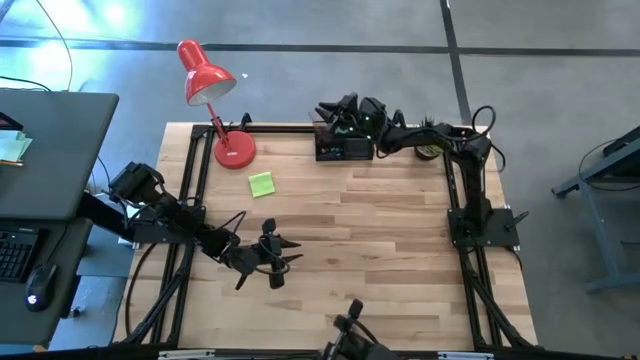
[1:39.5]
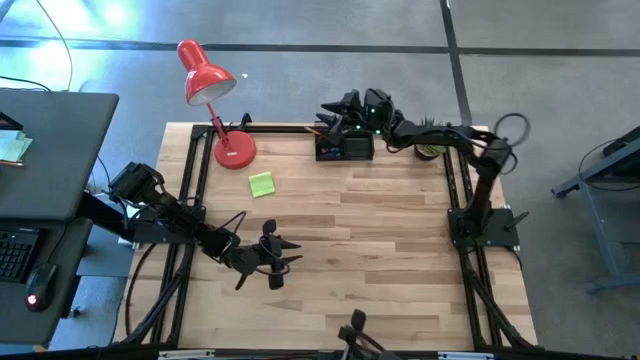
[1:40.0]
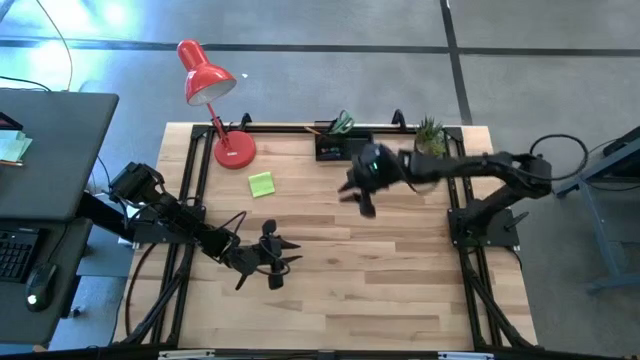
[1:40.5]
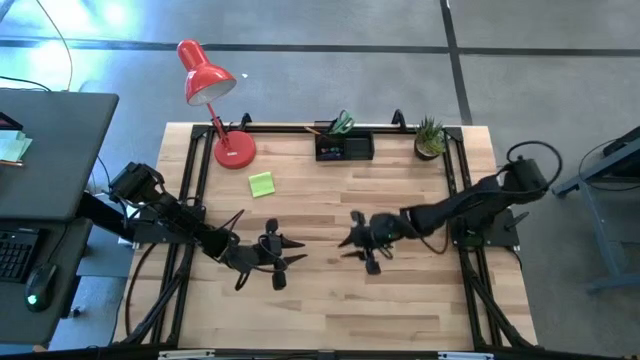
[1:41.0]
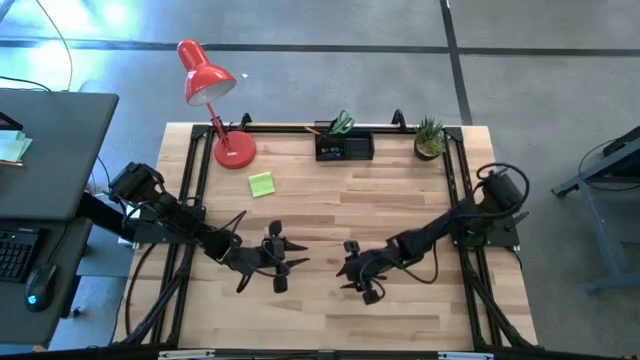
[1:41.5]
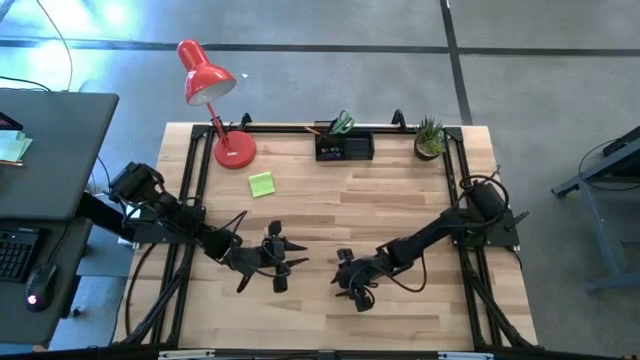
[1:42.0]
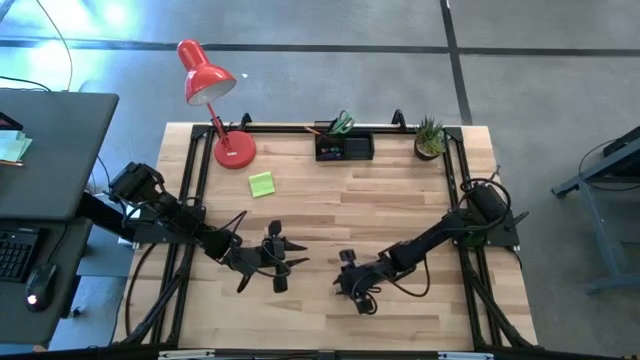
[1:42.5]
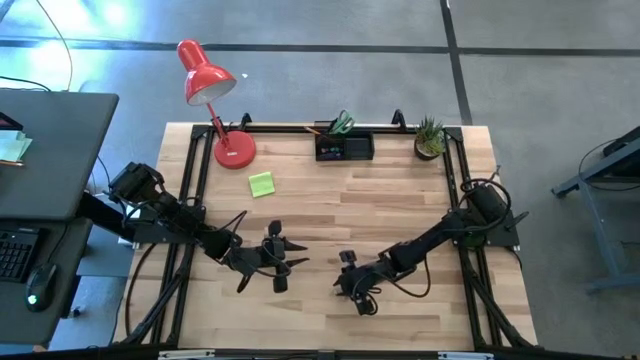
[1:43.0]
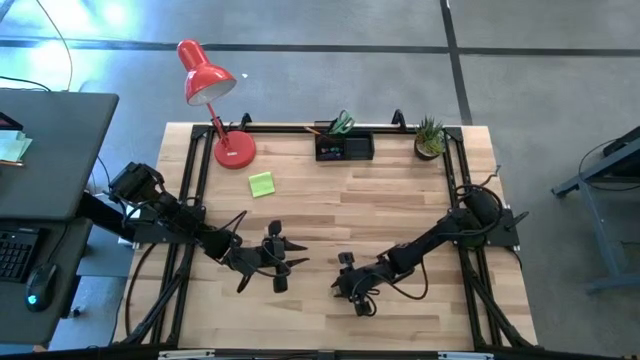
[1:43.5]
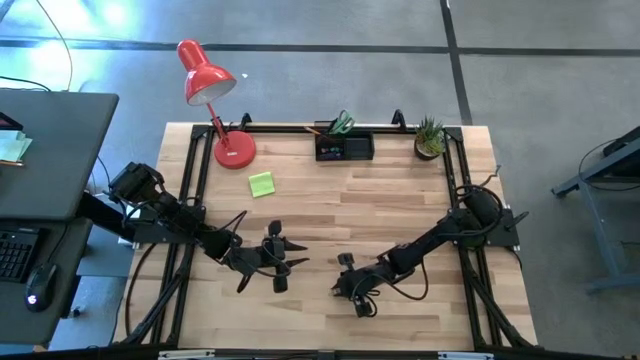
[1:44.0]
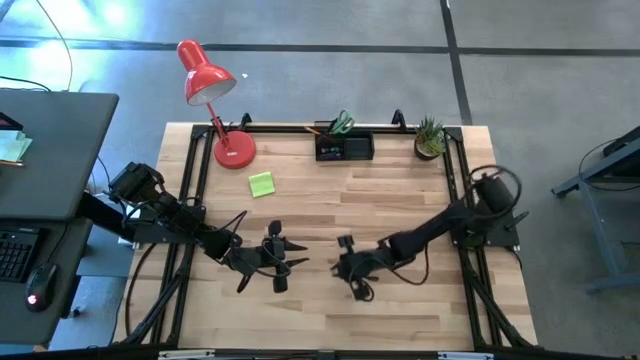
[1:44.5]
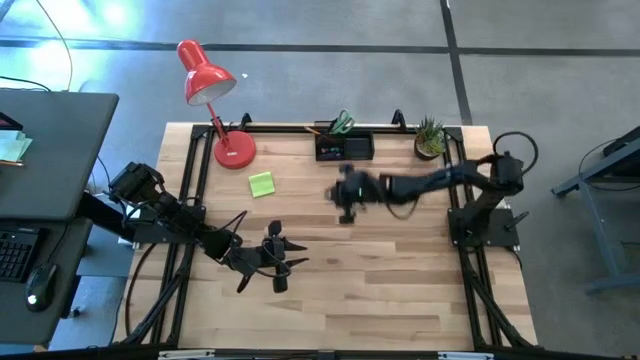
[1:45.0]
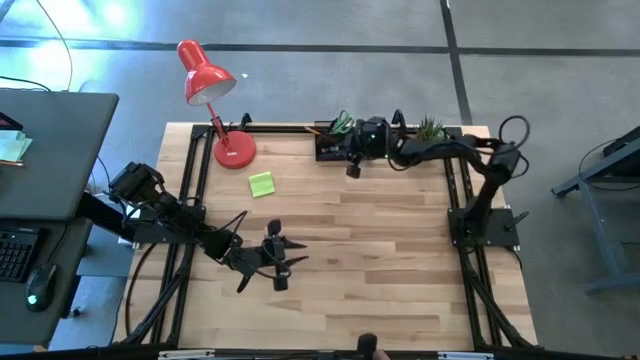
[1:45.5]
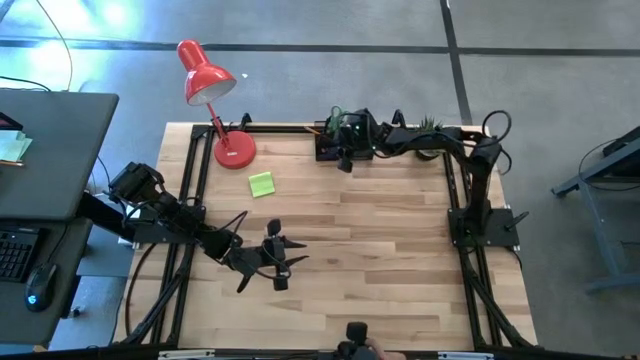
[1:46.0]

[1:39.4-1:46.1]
Task: Pick and place office supplies into organizer
Put the green binder clip into the desk organizer

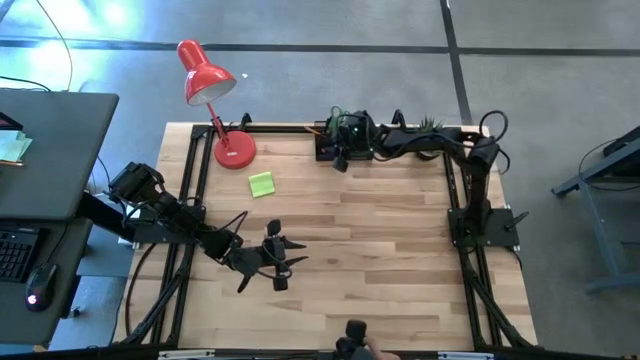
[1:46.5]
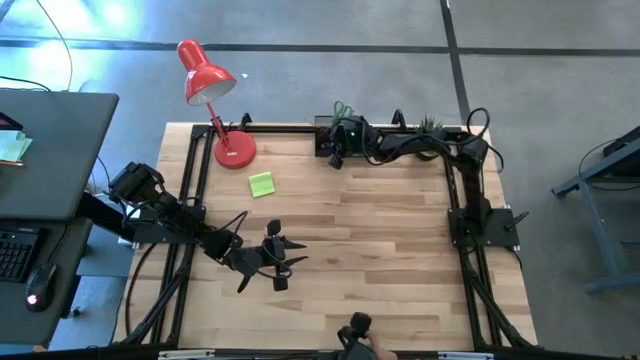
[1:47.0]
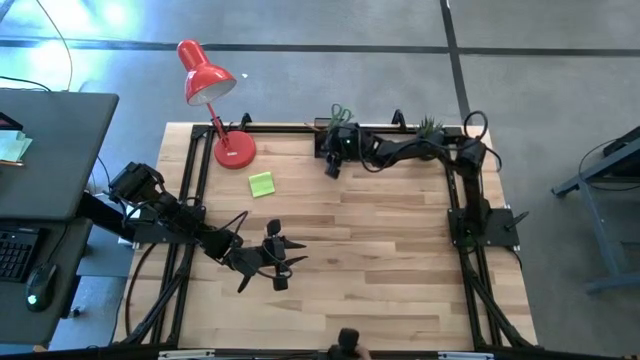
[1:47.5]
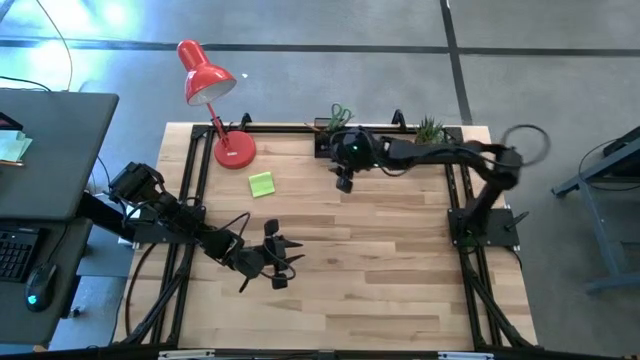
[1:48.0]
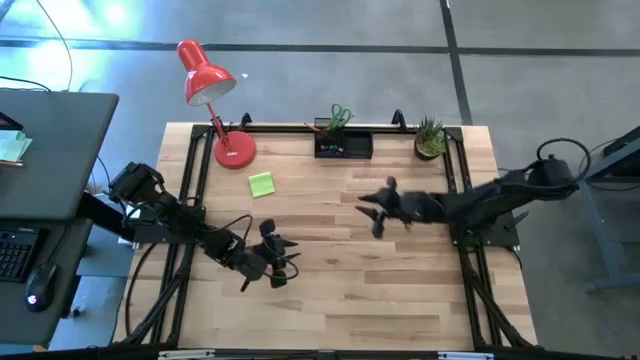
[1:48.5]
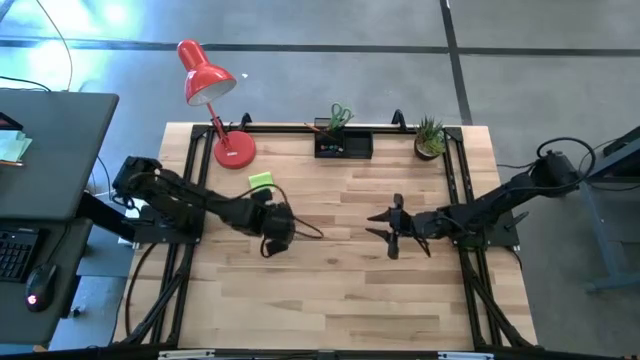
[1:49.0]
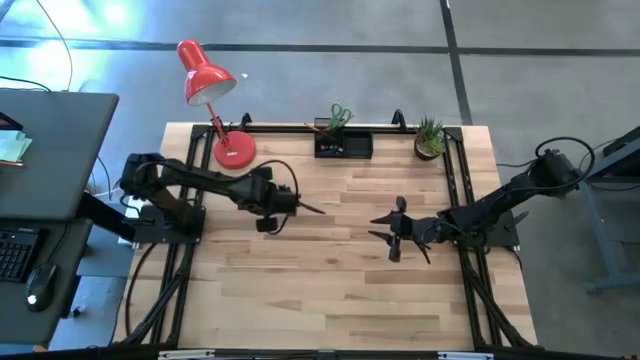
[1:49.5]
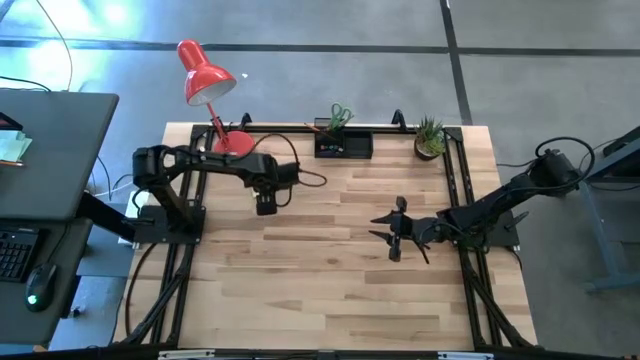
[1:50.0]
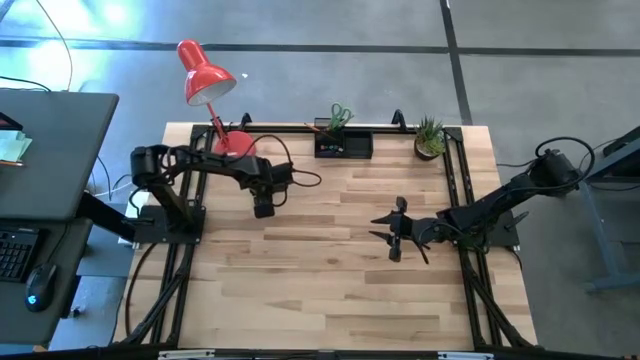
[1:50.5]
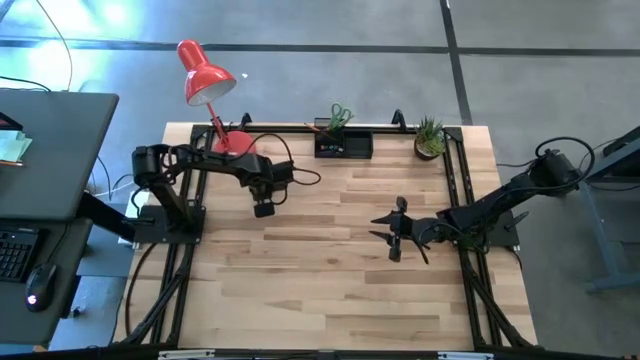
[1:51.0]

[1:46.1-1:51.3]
Put the green sticky note into the desk organizer

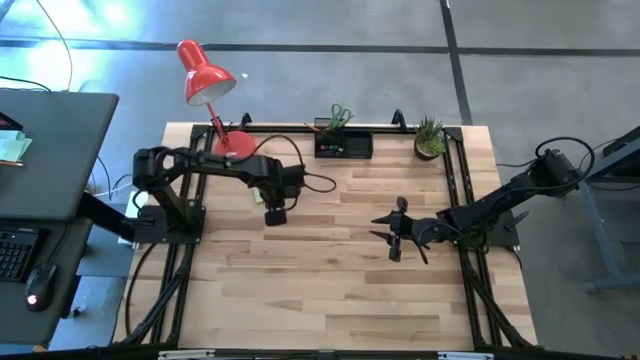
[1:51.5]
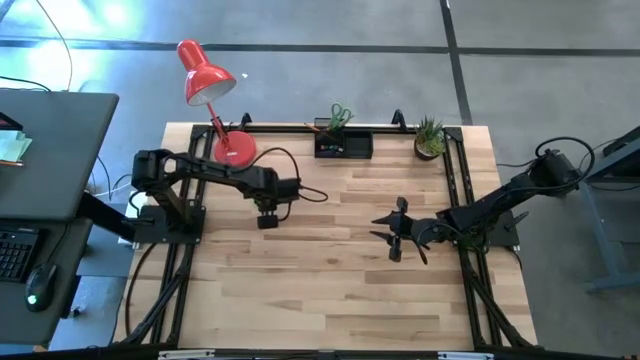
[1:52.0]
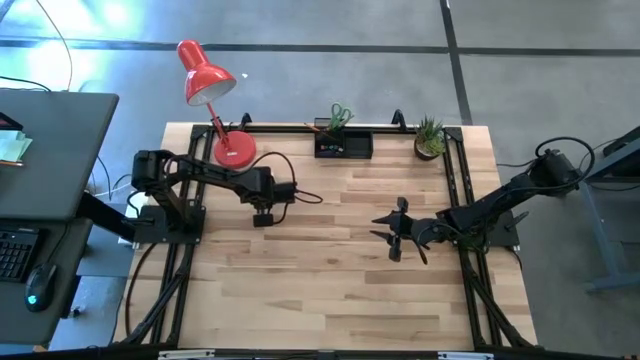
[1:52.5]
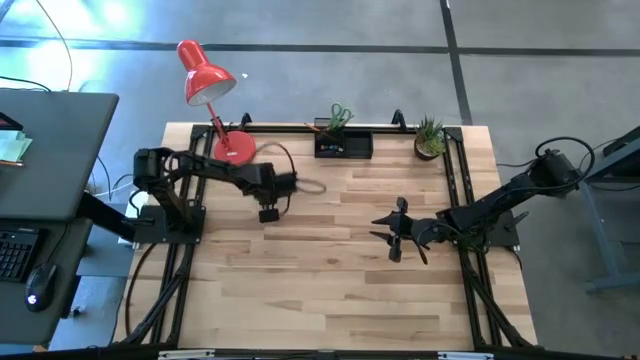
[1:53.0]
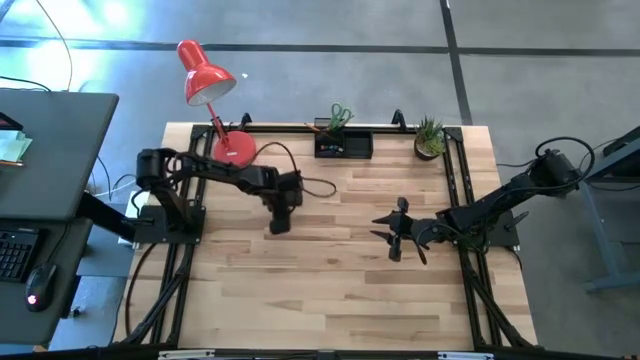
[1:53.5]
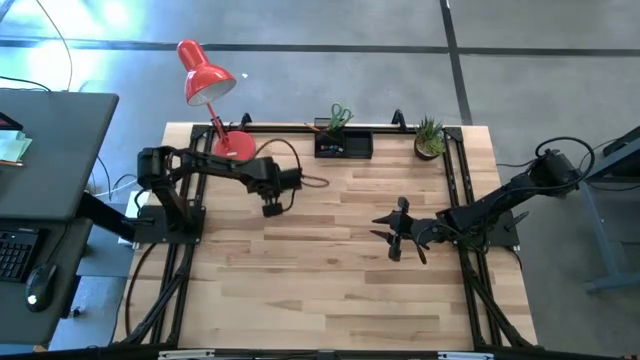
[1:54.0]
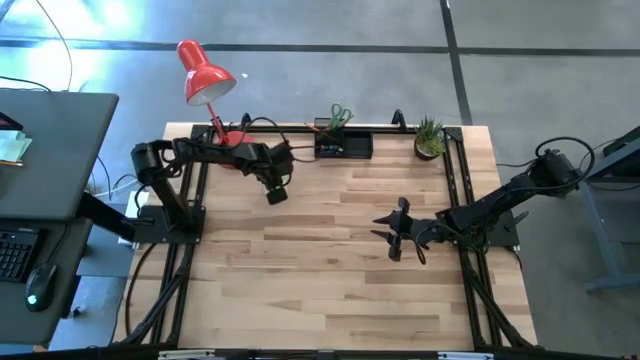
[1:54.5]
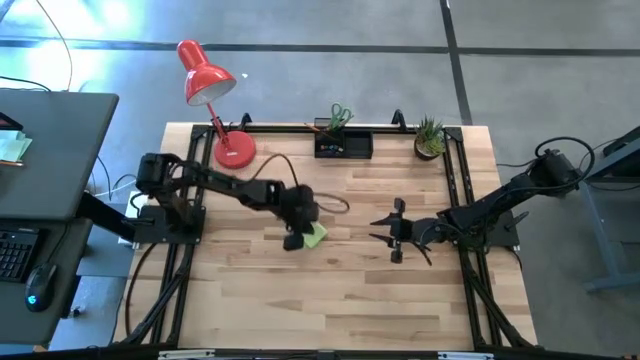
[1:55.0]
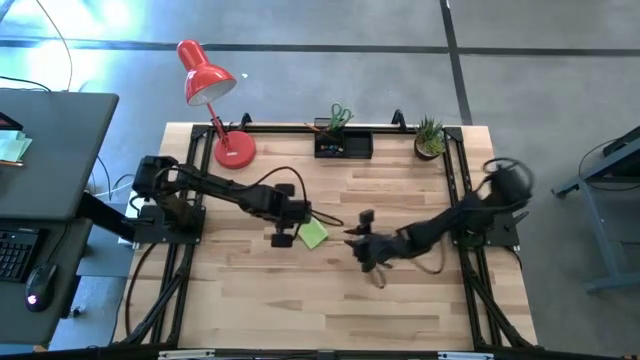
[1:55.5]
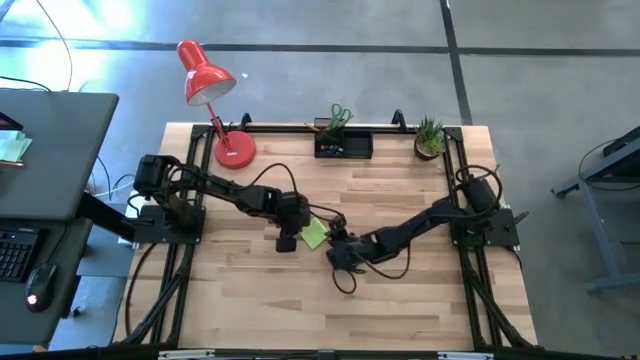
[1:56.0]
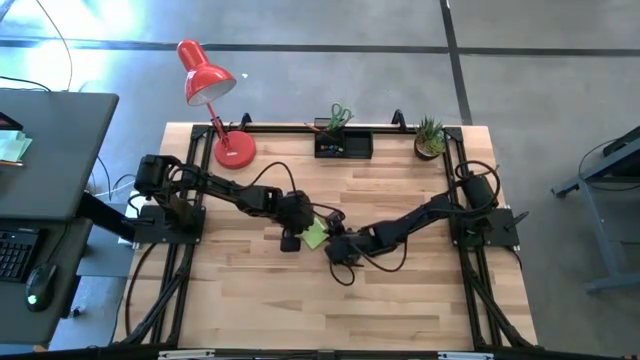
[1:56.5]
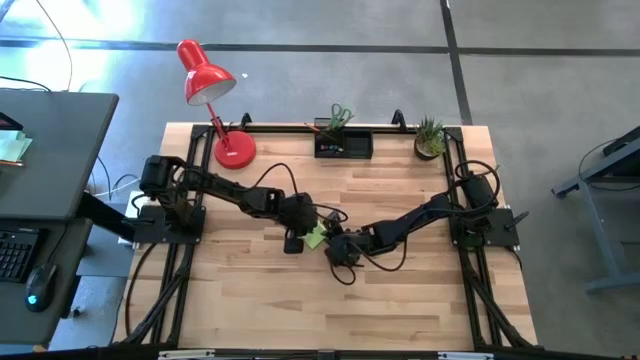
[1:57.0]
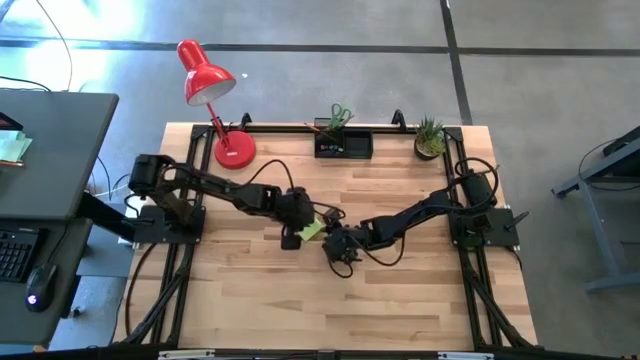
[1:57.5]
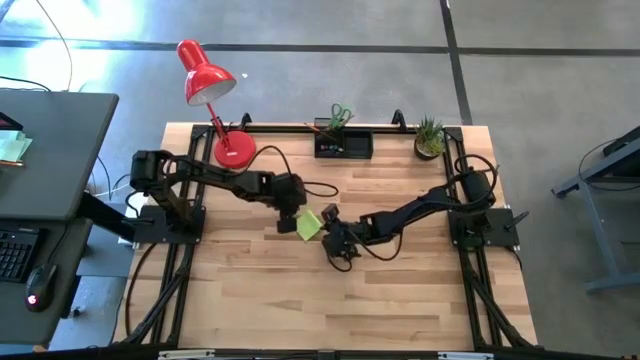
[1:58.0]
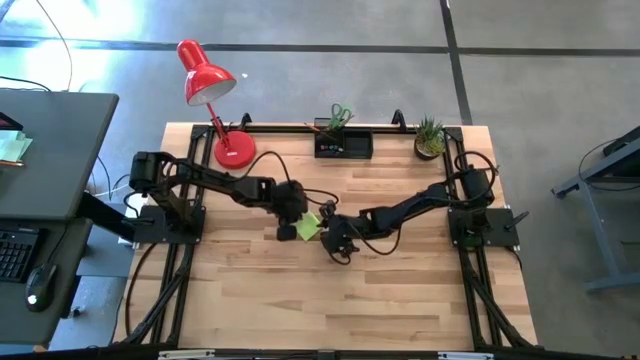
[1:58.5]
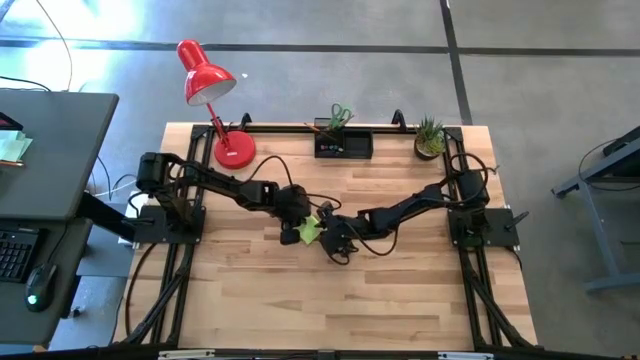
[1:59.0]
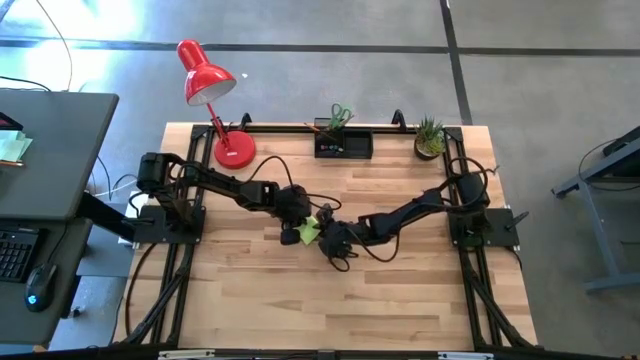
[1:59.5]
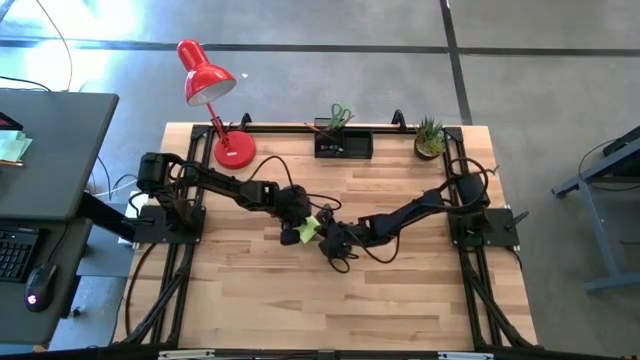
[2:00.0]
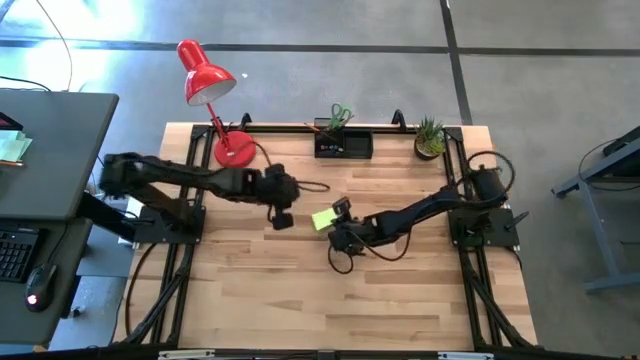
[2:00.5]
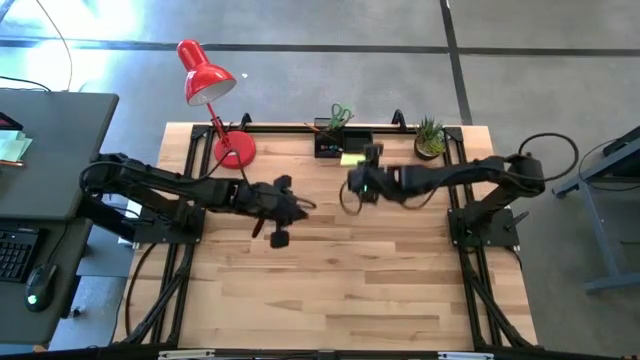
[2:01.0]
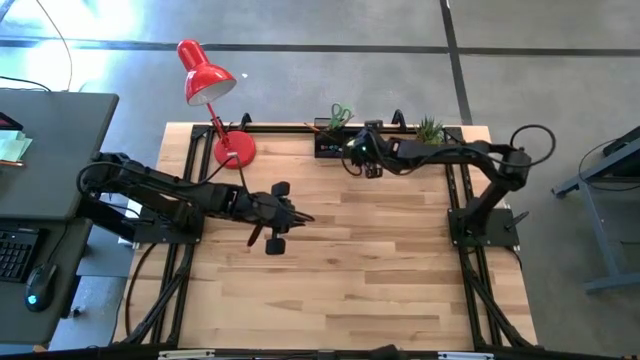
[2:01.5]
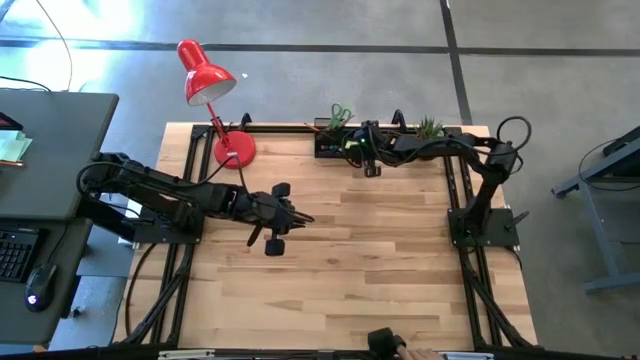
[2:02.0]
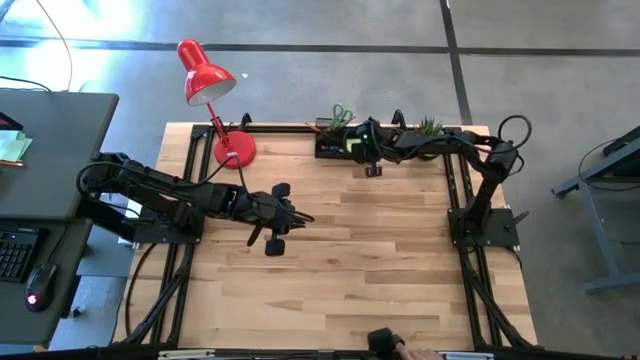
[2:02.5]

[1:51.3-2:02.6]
Put the green sticky note into the desk organizer
